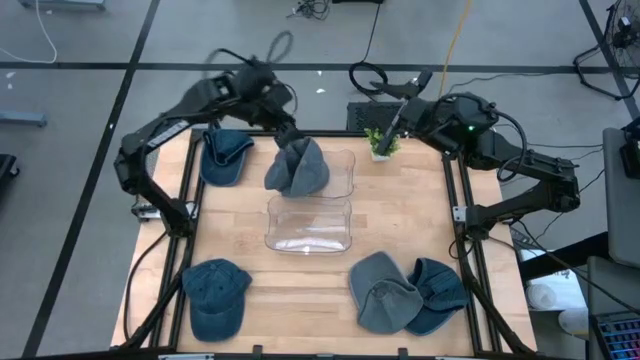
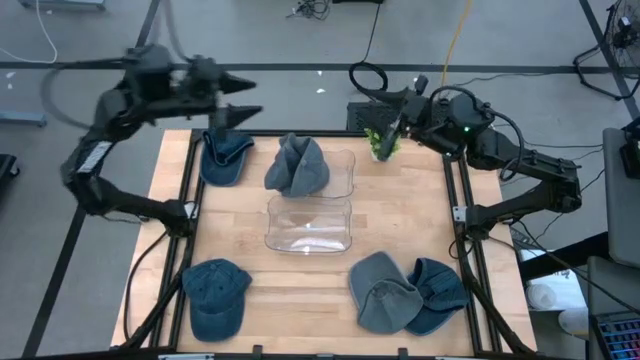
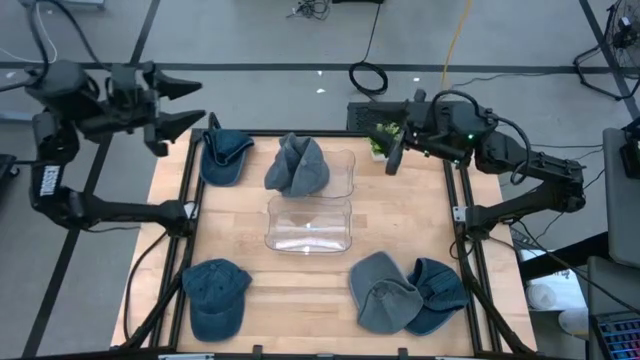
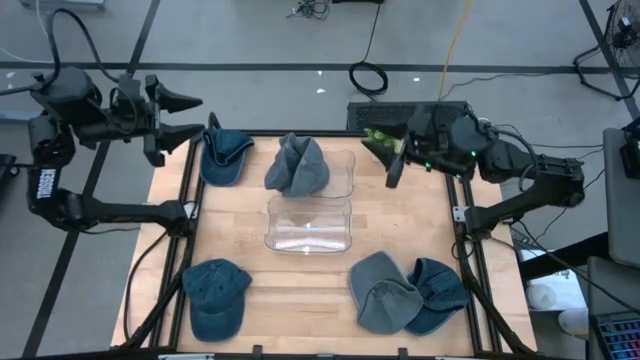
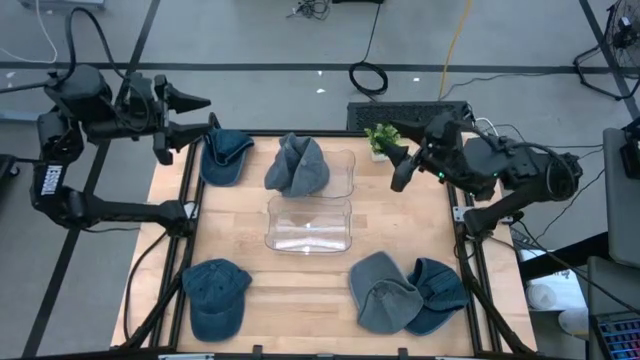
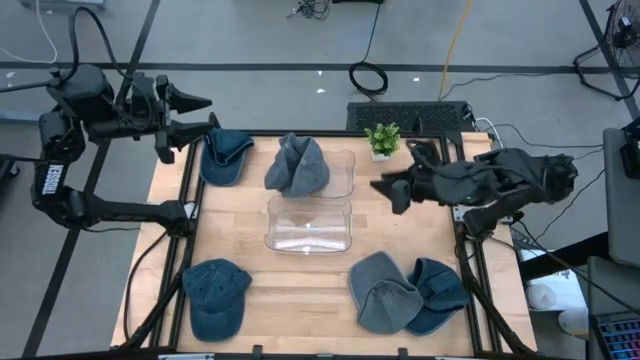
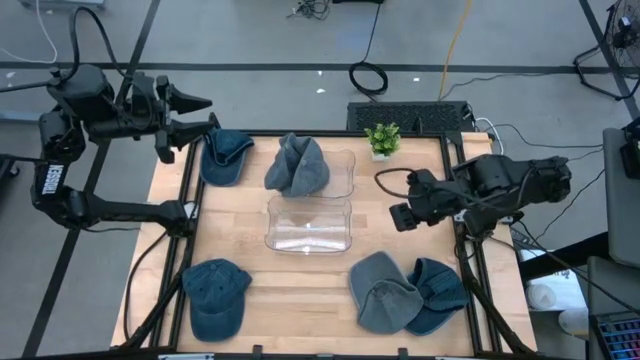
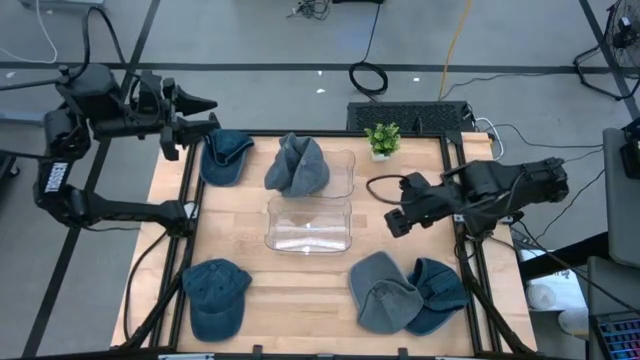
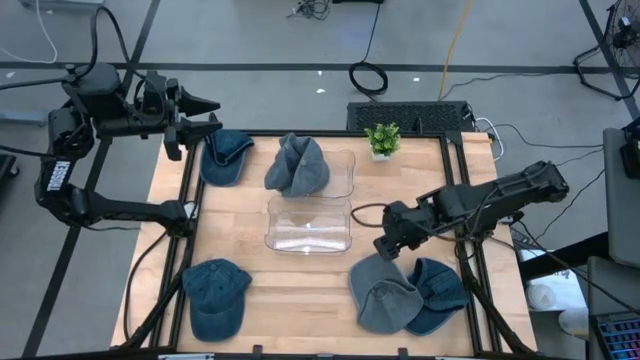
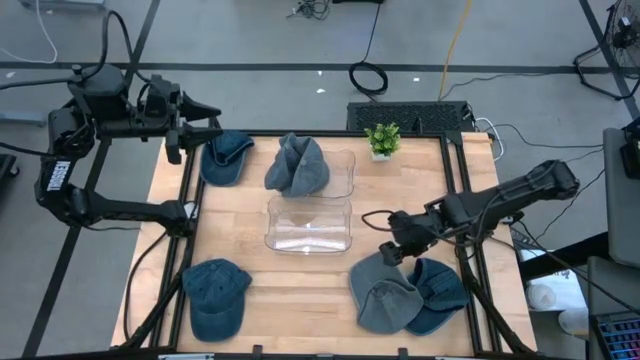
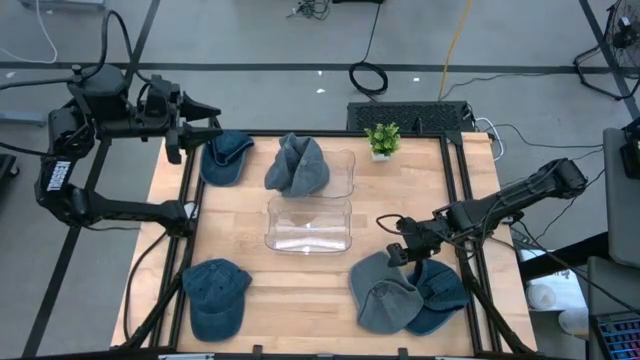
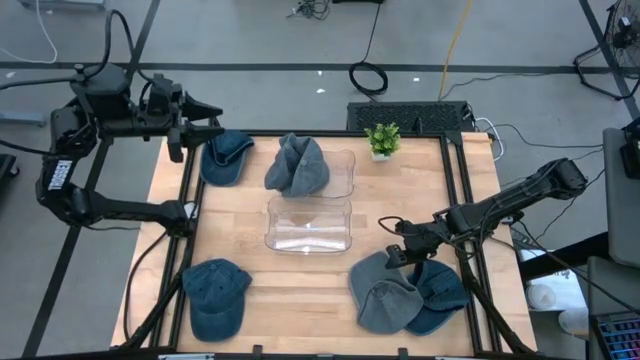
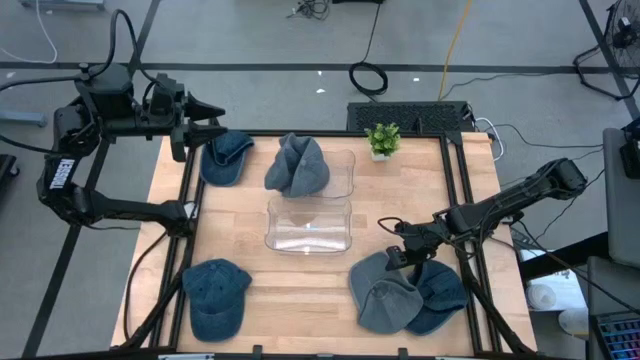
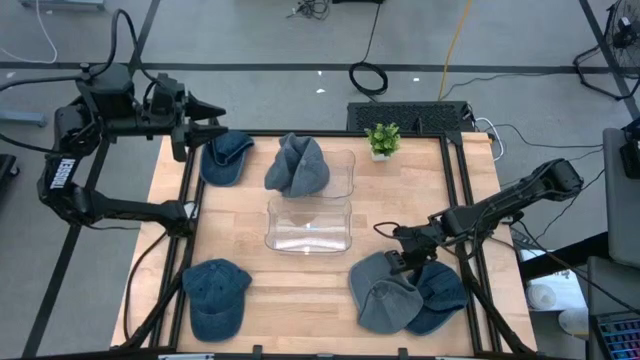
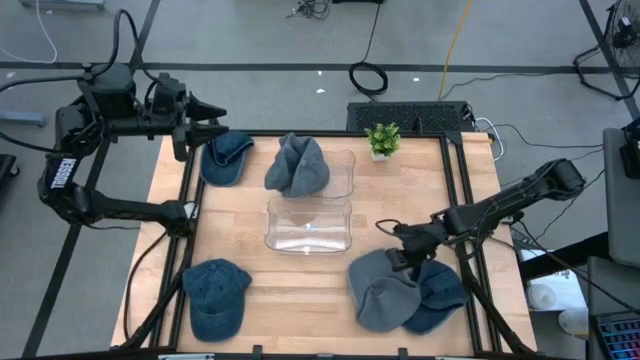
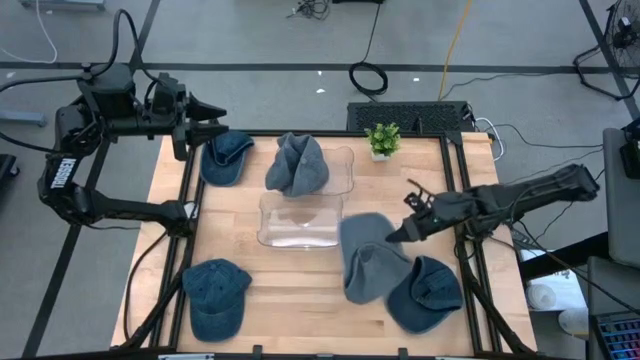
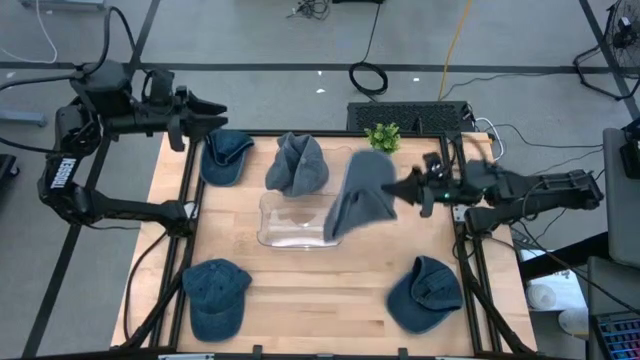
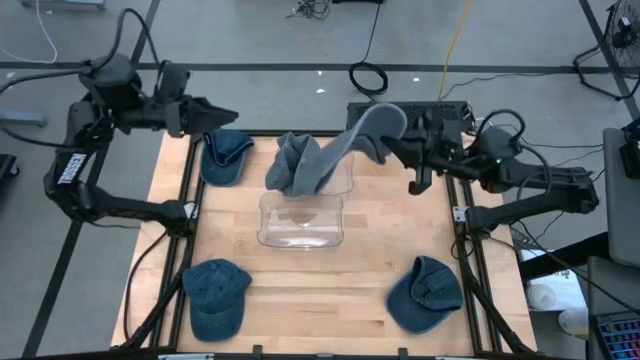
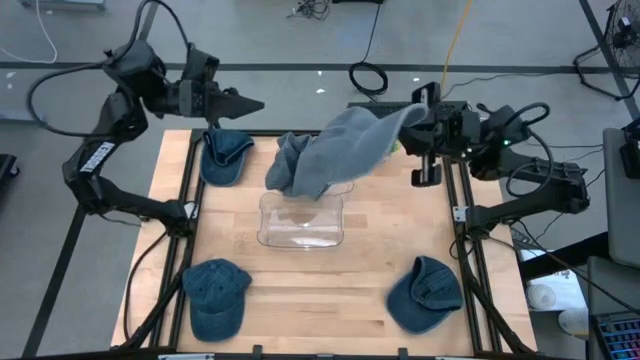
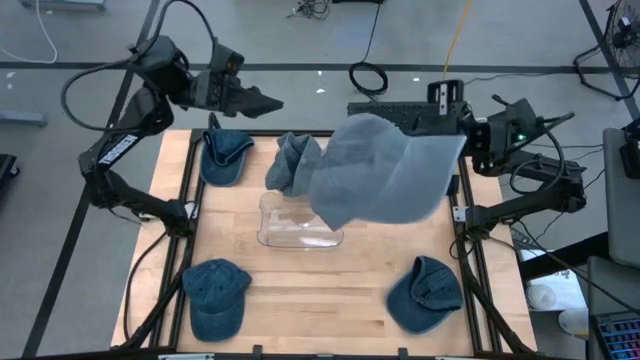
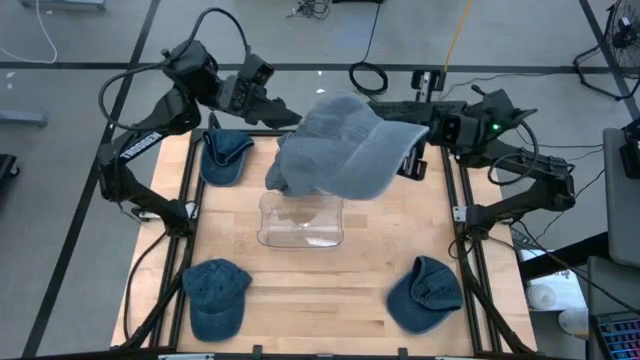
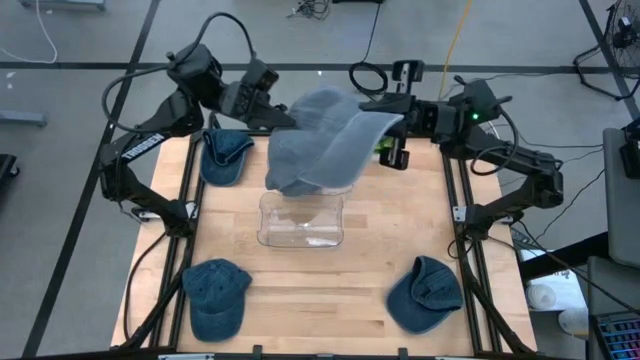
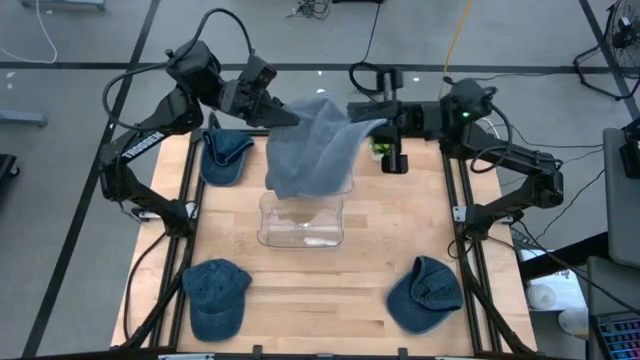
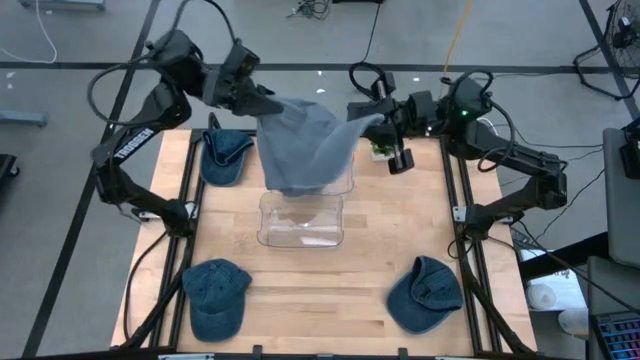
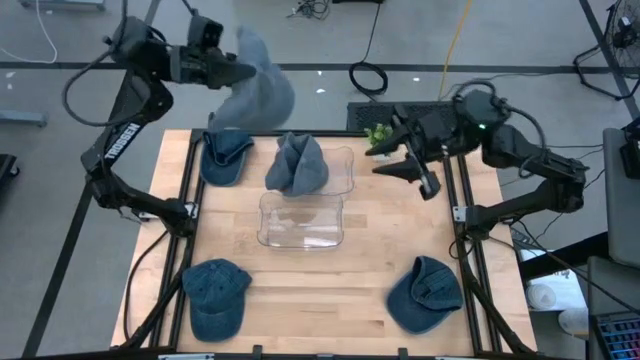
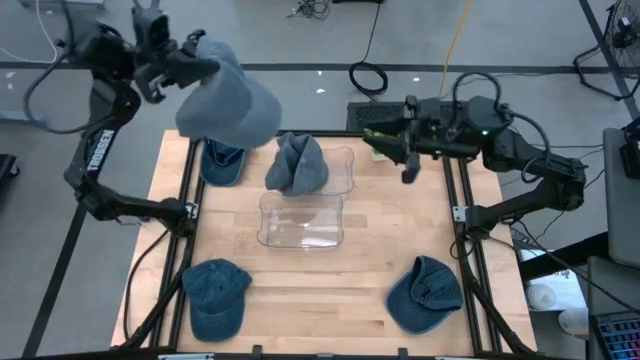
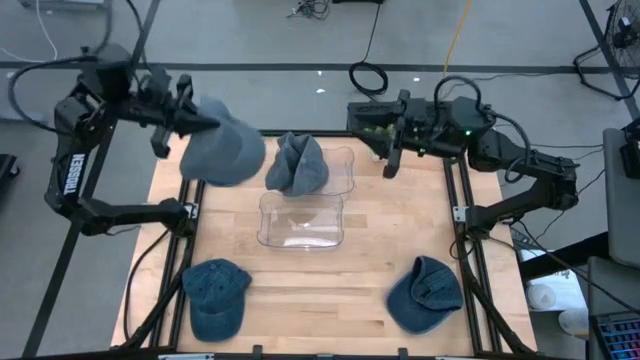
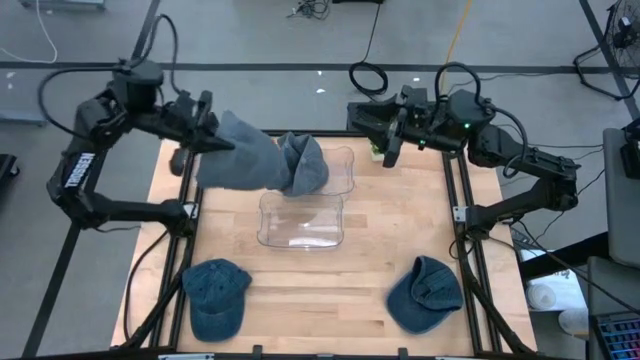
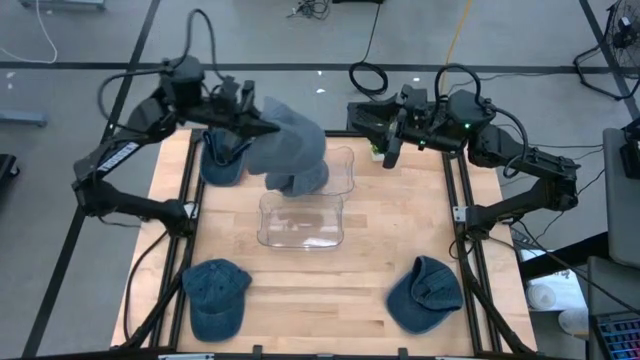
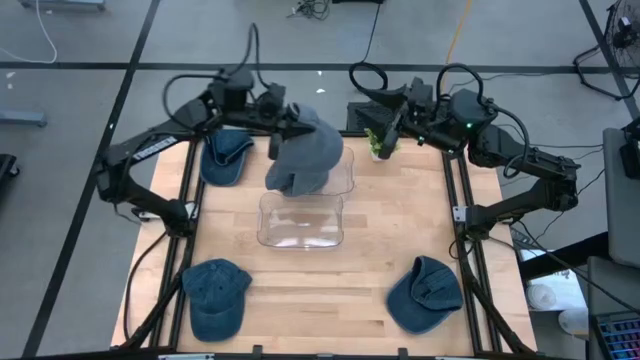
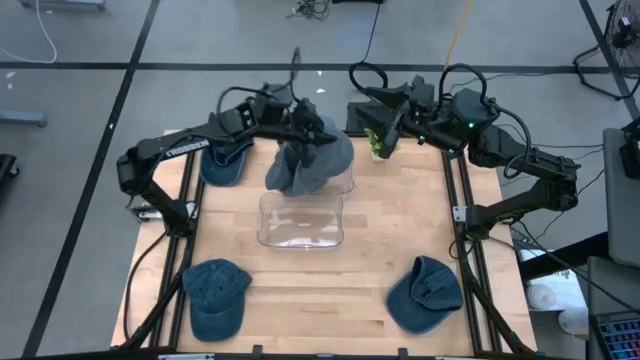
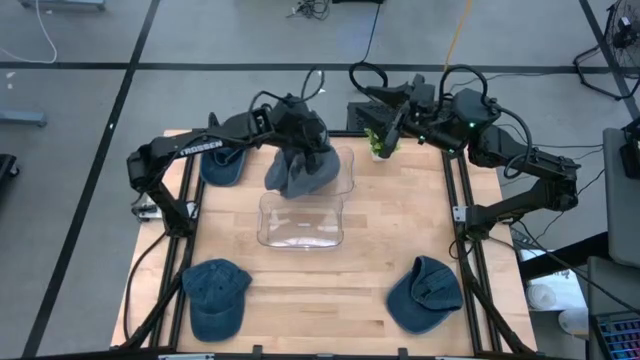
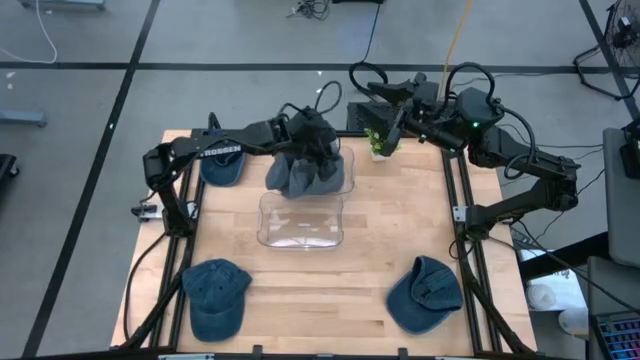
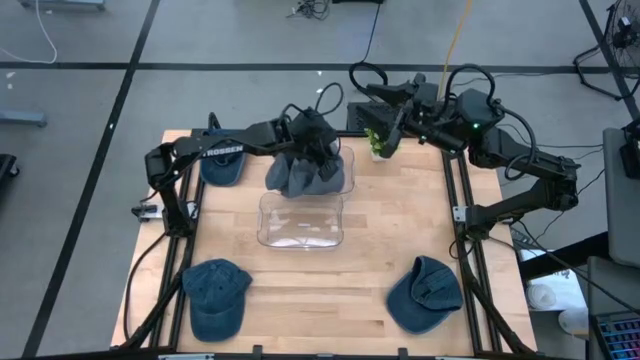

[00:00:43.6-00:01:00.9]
Task: Pick & Place hat
Put the gray cap into the top transparent bin

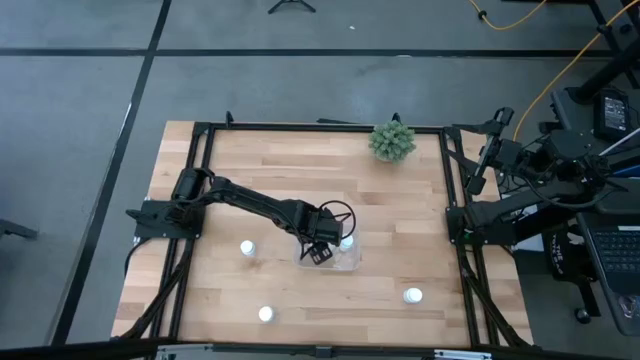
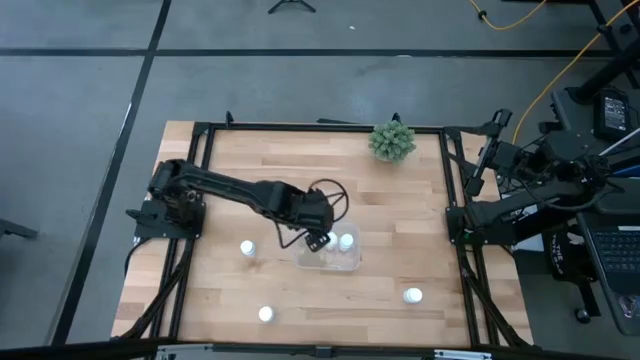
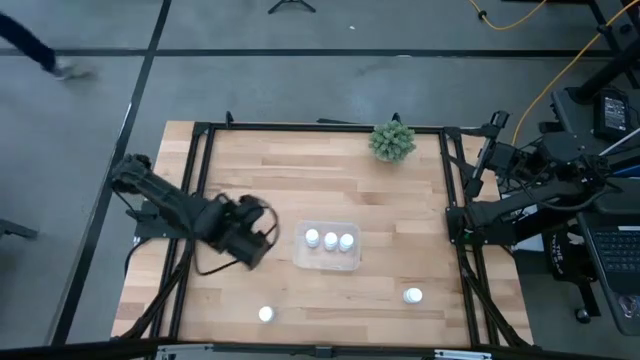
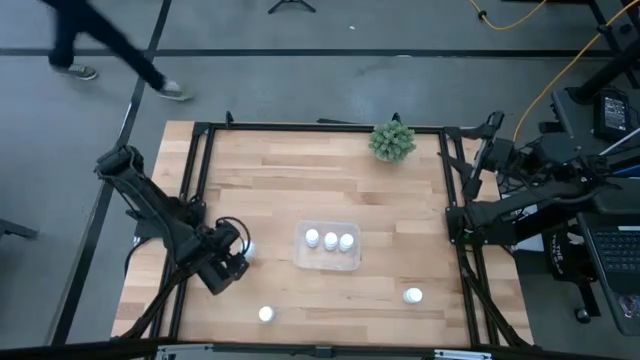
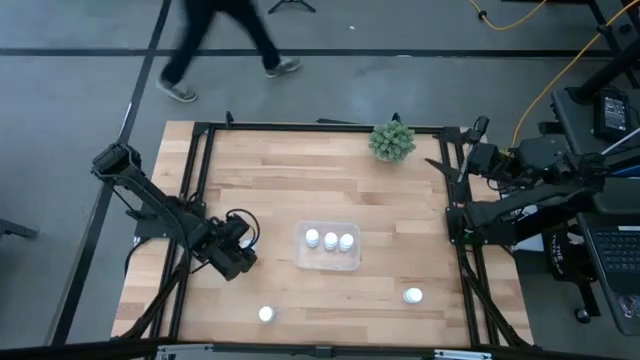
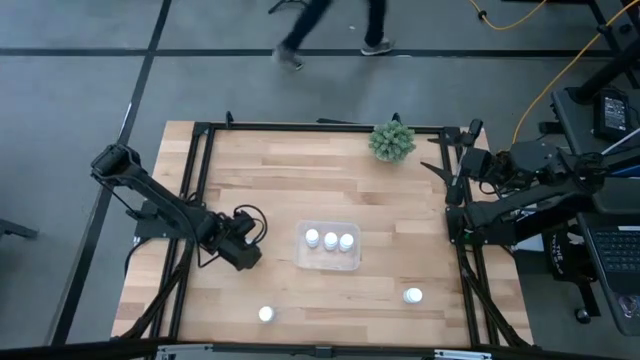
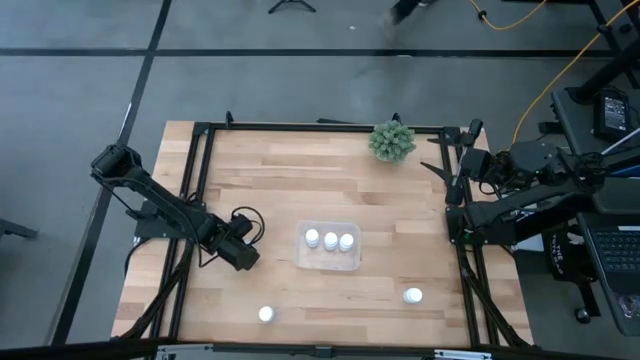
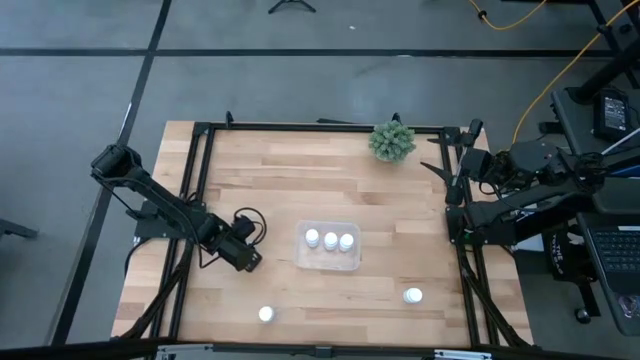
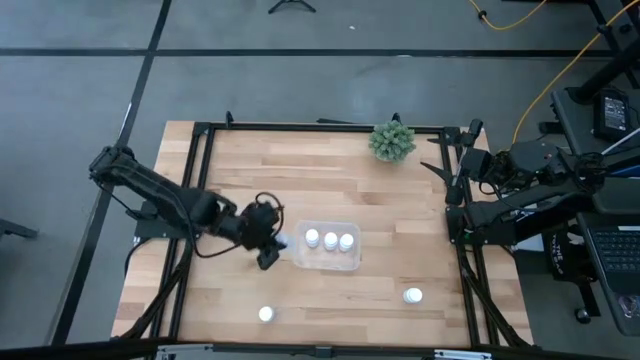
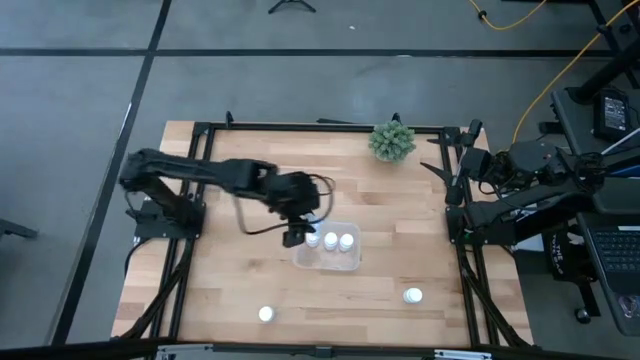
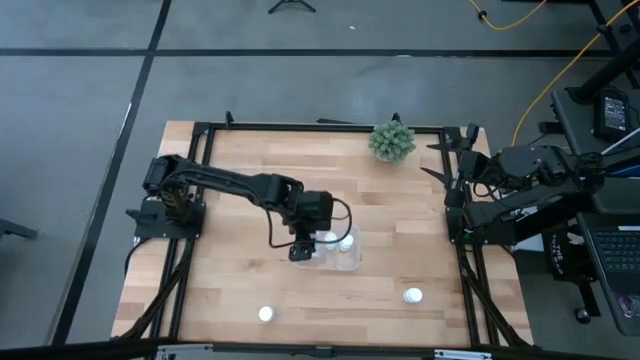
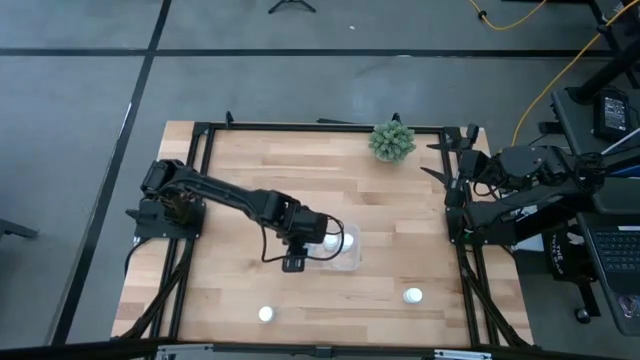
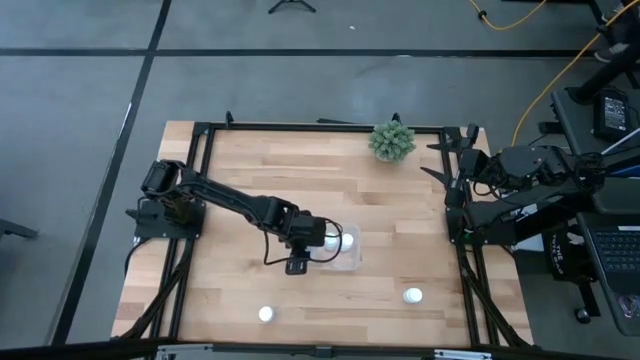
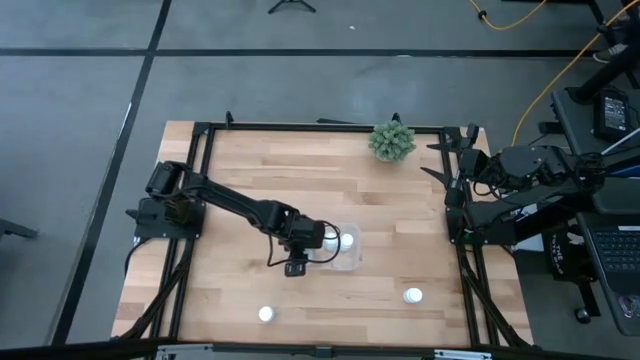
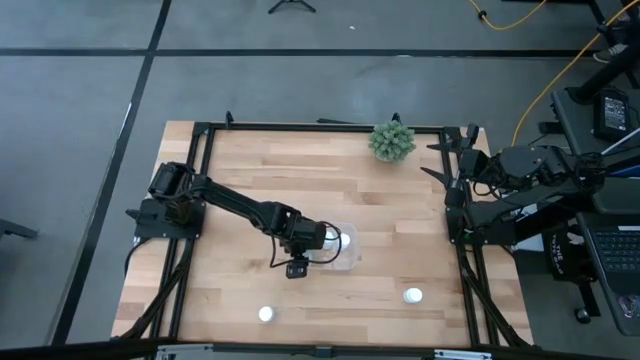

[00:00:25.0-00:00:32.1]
Task: Pick and place pill bottles into a basket
Put the white pill bottle into the transparent bin
